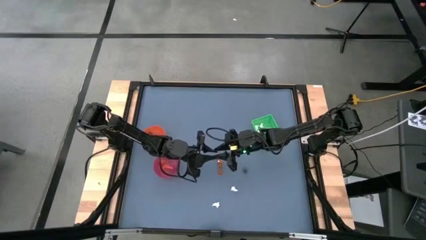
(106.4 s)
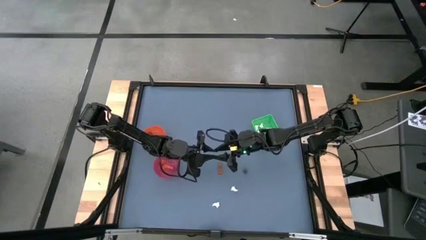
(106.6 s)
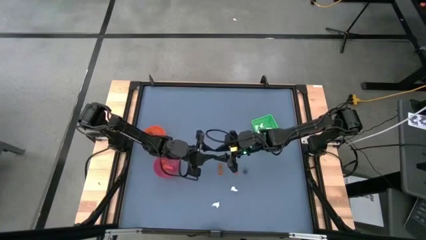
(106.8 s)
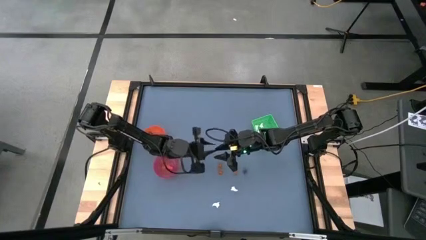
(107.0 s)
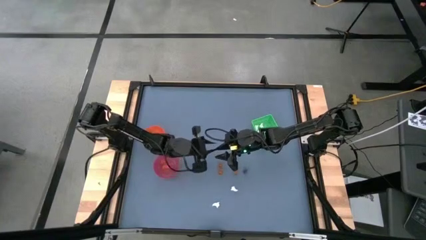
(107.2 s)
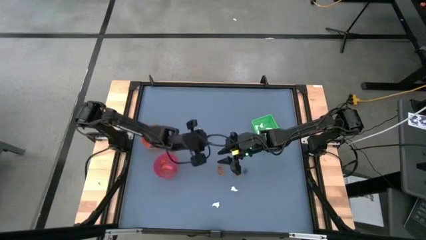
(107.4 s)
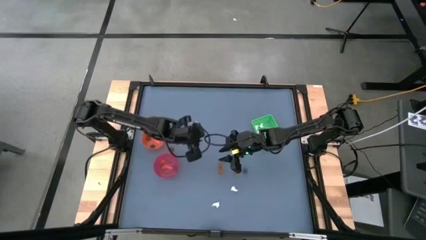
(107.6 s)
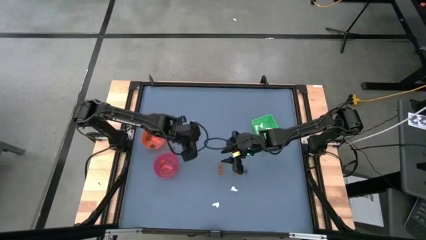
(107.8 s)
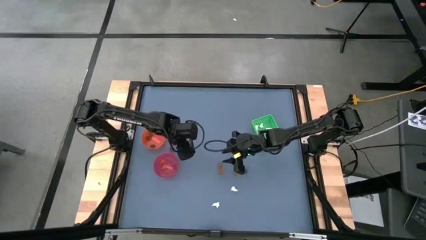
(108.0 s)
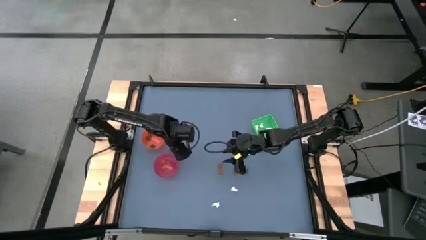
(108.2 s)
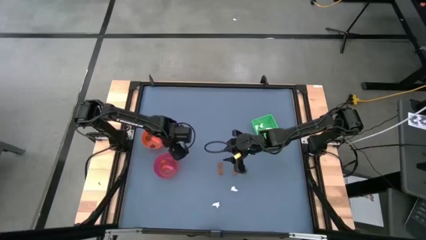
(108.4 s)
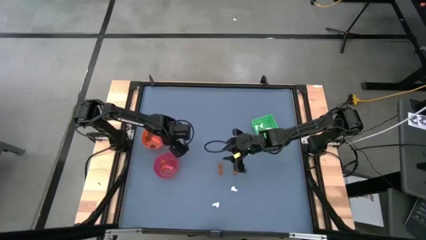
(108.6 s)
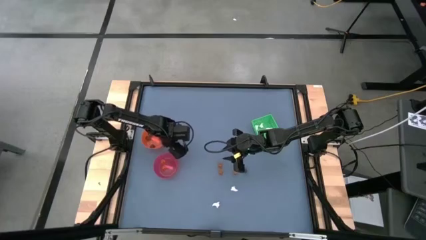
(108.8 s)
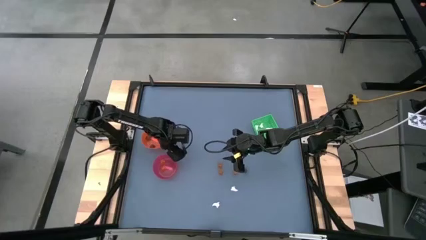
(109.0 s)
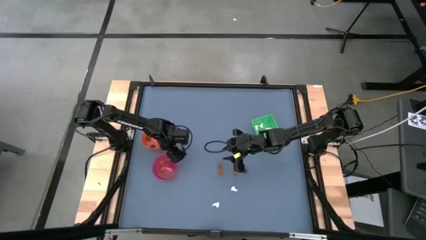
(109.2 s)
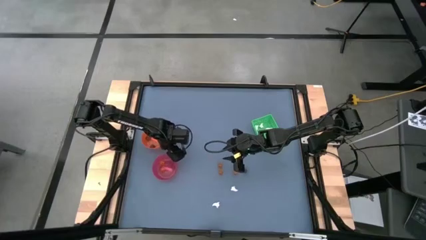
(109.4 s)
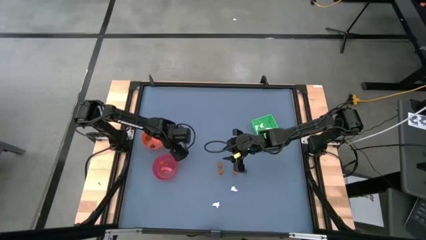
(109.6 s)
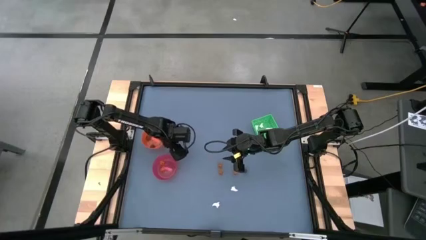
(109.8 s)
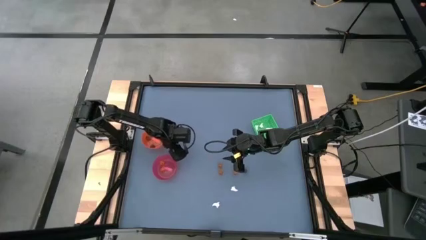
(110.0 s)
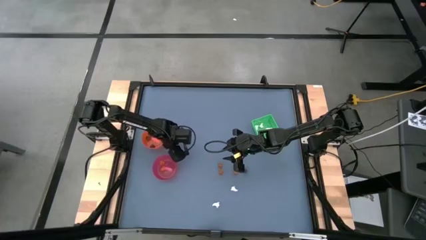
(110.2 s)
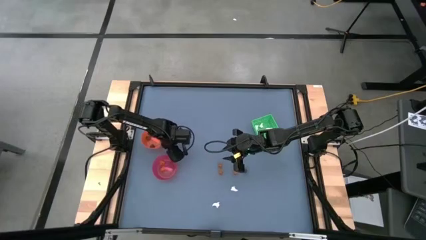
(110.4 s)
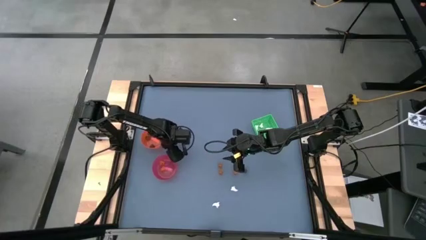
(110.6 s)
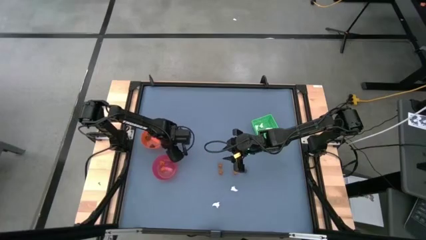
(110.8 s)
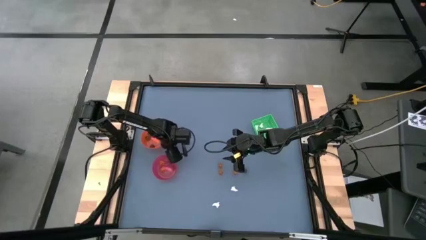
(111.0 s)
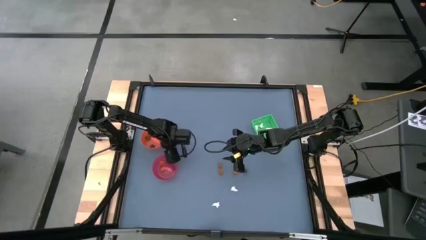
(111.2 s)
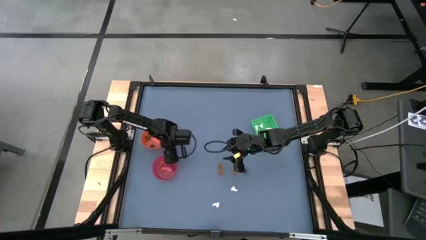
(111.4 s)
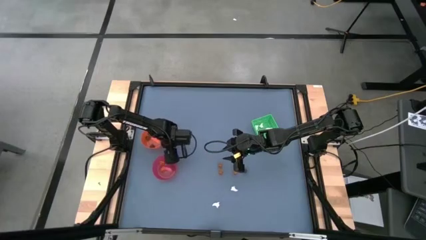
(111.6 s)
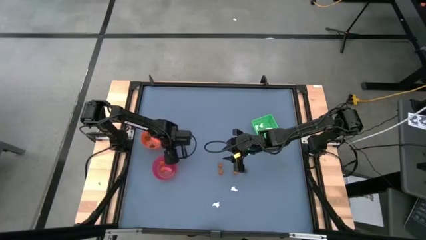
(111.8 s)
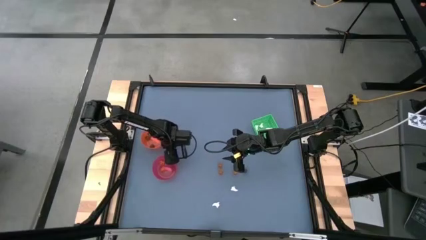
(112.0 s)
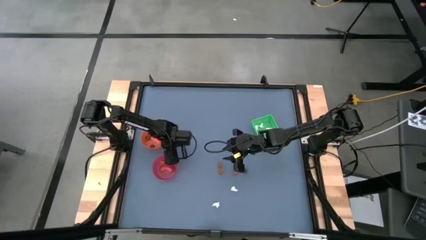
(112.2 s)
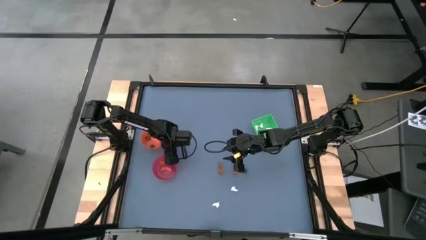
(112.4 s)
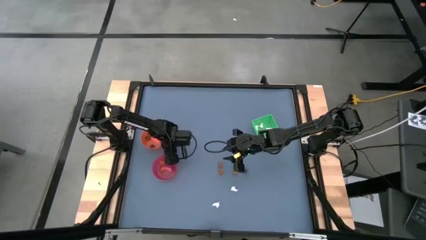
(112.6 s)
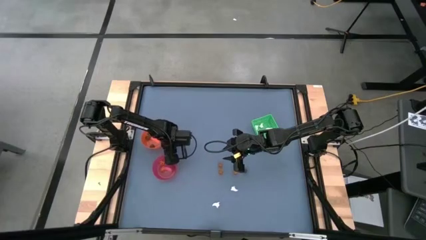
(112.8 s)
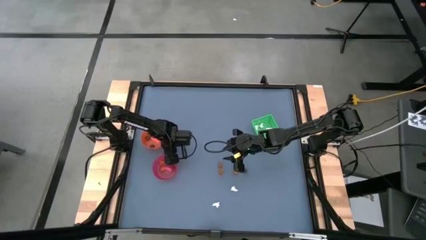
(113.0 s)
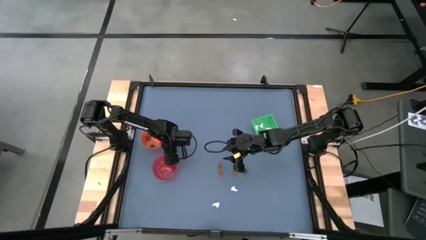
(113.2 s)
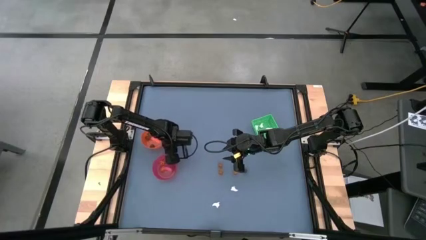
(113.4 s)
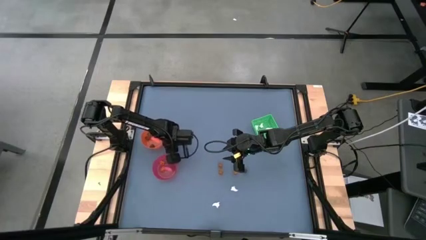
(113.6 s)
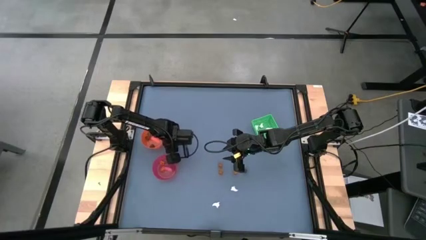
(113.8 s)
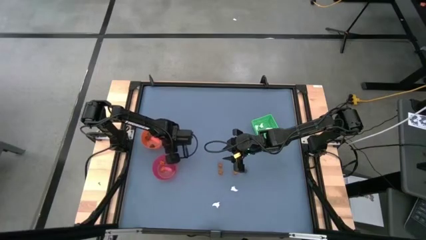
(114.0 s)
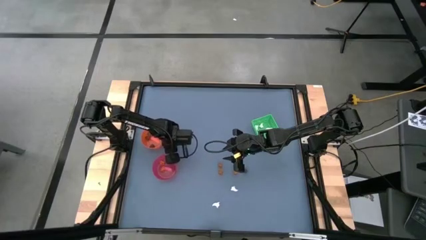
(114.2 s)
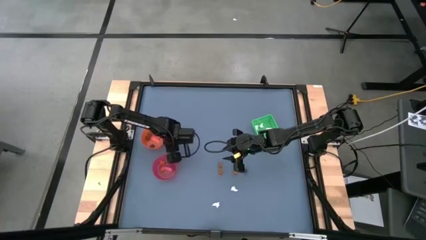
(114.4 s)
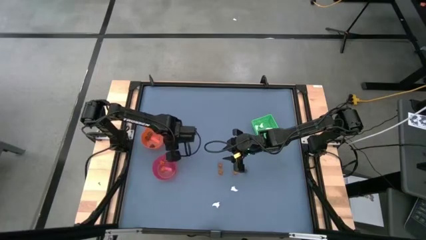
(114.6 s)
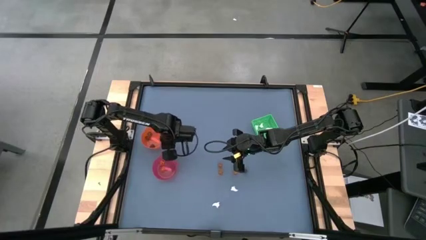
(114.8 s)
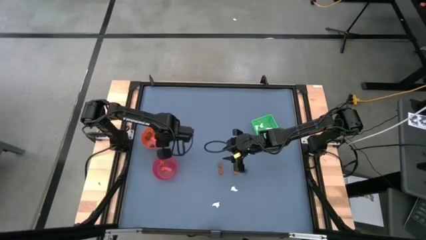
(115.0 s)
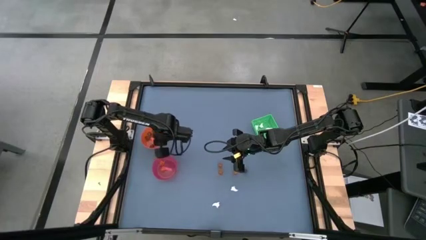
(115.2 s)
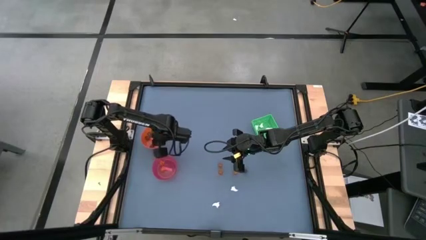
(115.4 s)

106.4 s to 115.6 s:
Task: Sort Halloween decoration
Put the black skull toy into the orange bowl

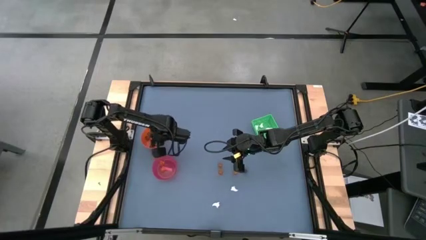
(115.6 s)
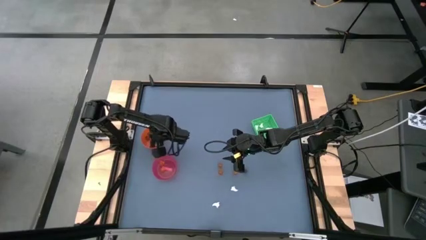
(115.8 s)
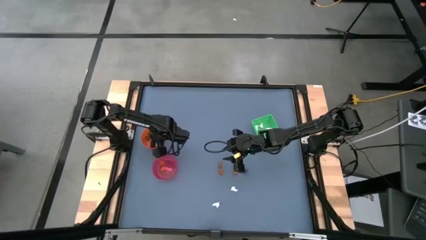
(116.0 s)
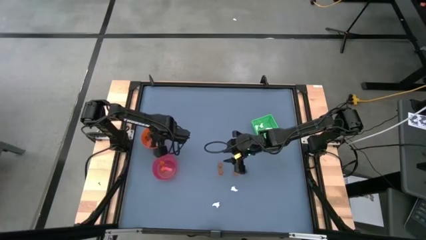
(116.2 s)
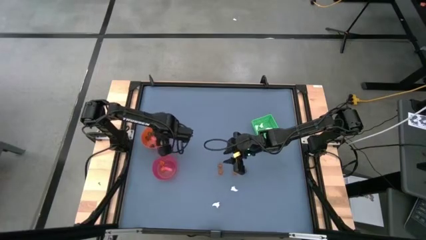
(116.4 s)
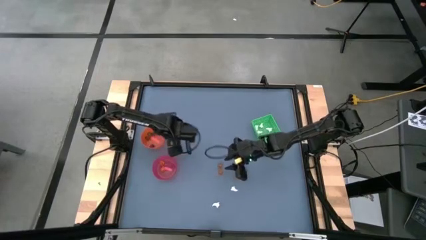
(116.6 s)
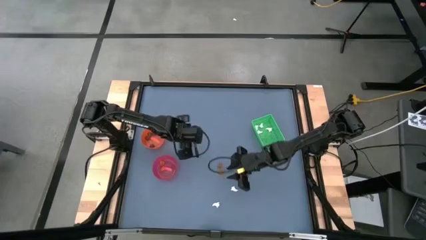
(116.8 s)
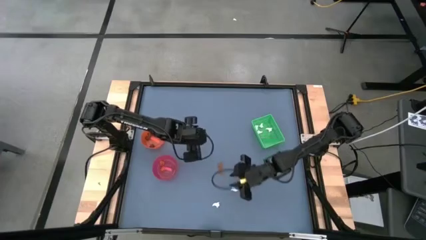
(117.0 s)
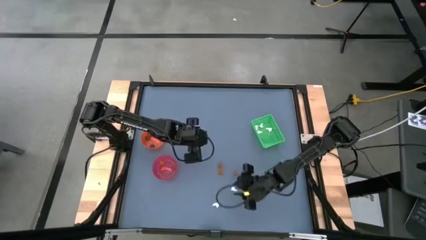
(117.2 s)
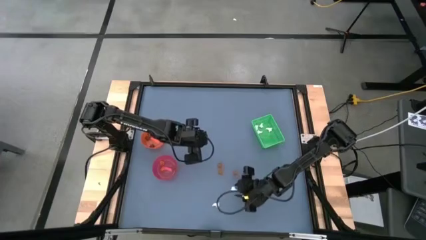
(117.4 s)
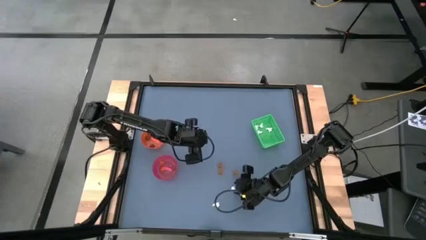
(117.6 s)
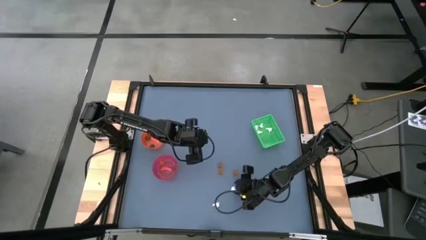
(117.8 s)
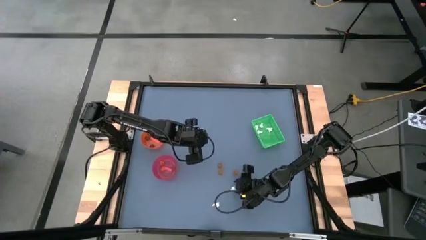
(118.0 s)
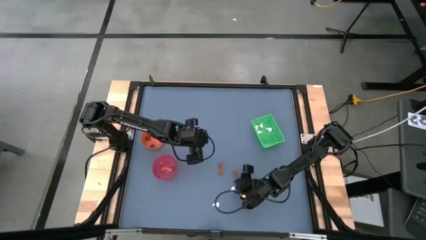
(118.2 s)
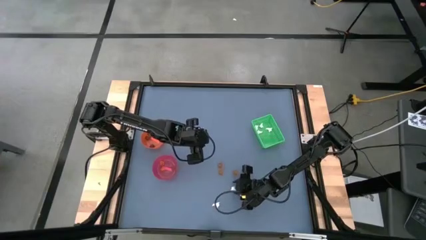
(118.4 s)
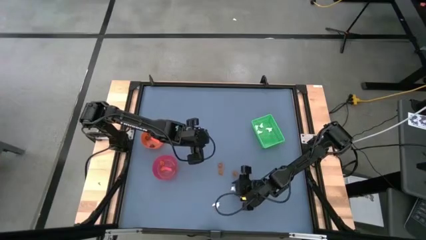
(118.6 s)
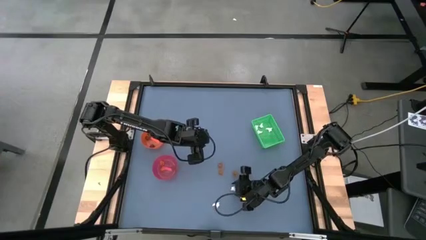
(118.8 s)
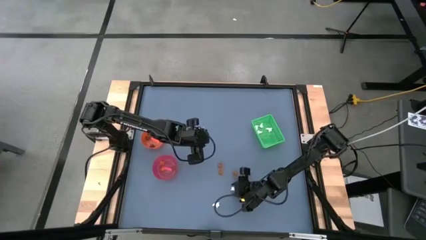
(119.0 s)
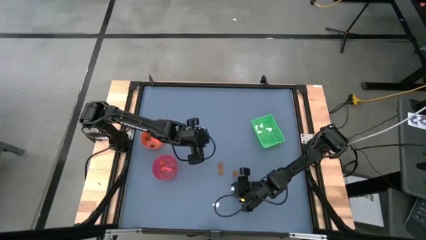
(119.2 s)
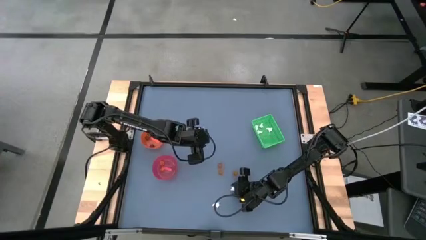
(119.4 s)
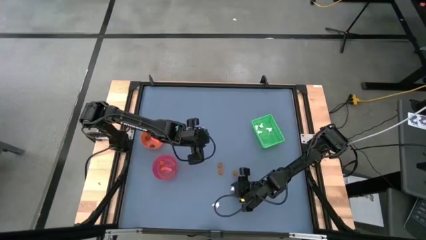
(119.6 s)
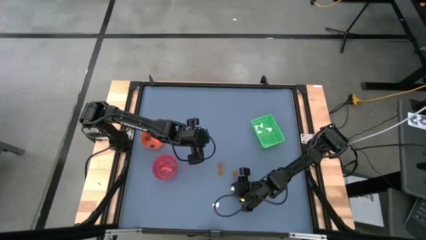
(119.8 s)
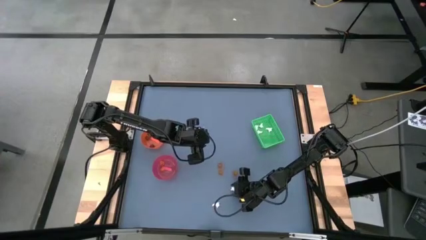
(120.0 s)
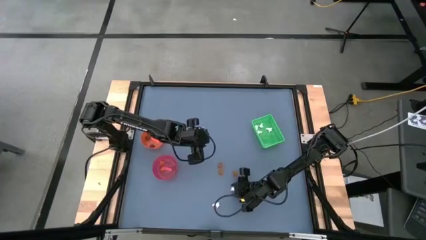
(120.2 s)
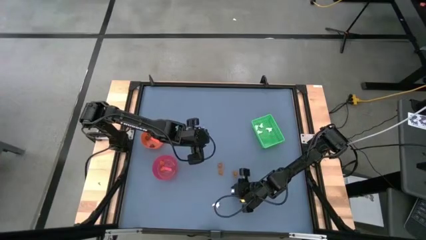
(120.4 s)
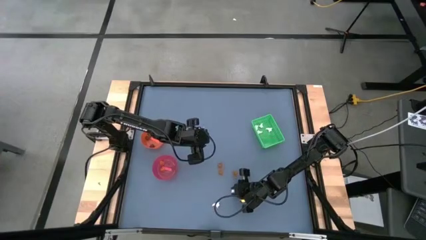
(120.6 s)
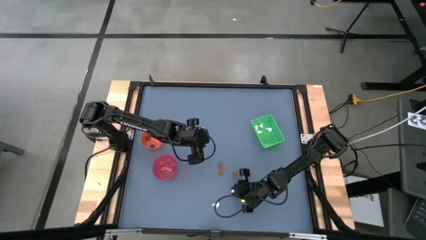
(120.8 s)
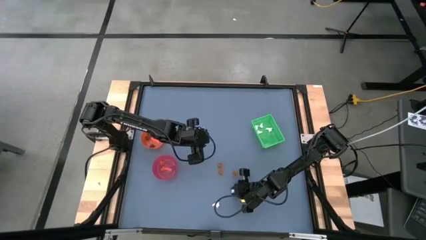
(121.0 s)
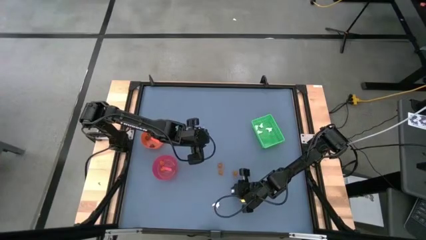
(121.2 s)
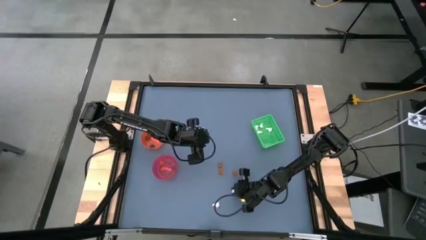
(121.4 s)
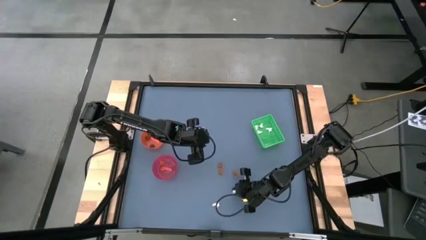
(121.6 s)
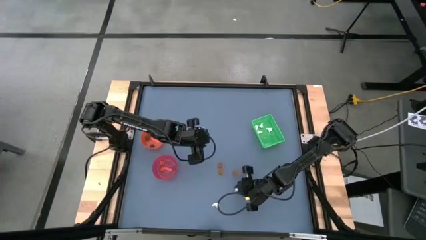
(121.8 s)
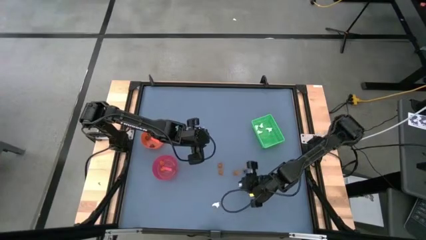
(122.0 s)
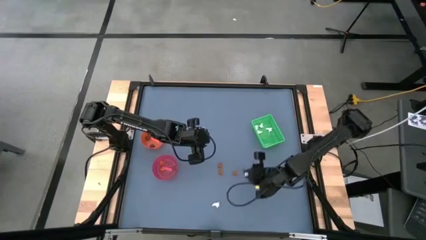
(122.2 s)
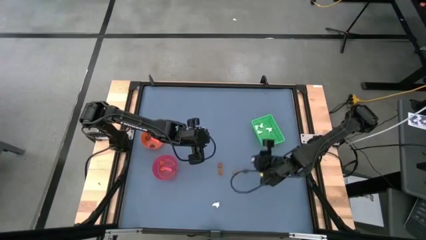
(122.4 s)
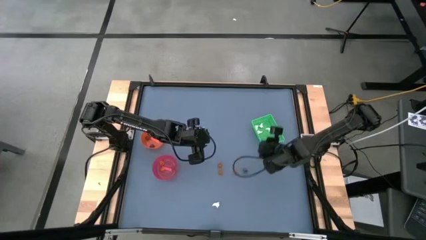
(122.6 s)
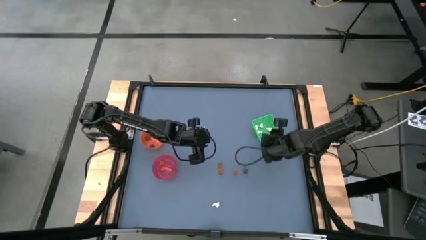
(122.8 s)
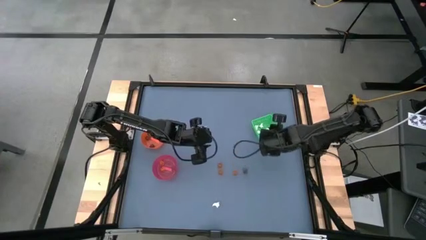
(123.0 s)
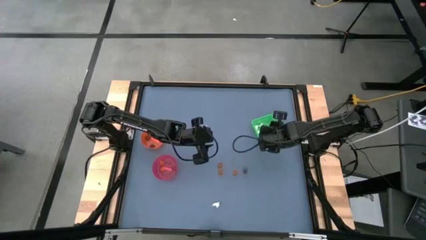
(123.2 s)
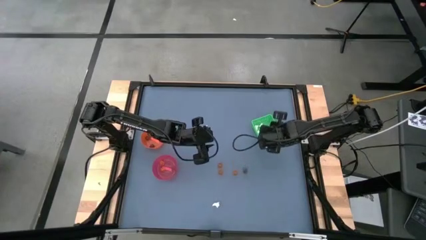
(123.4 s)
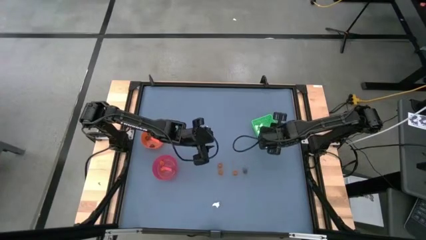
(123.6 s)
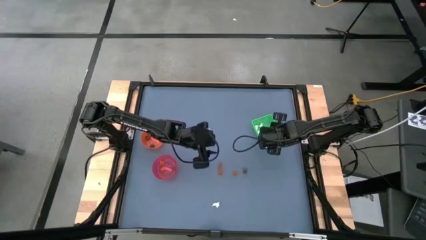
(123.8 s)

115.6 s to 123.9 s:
Put the white ghost toy into the green bin
